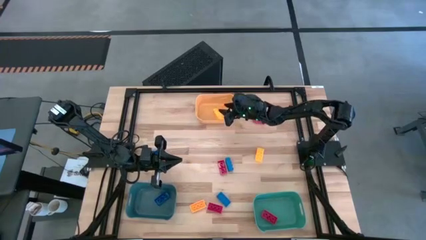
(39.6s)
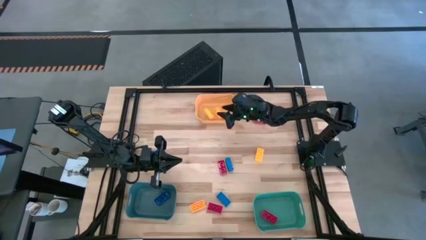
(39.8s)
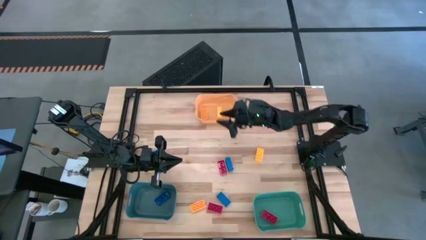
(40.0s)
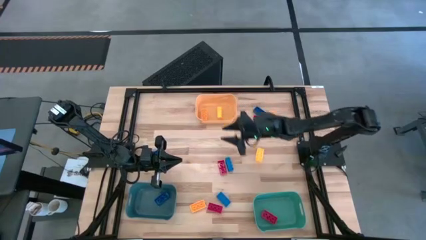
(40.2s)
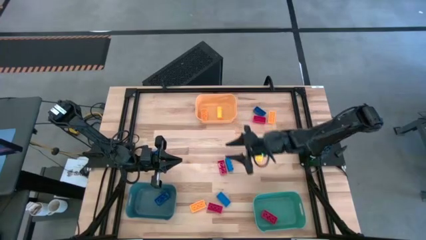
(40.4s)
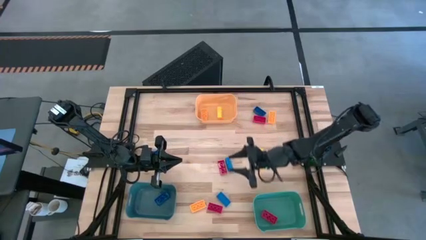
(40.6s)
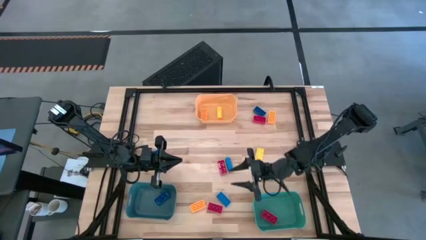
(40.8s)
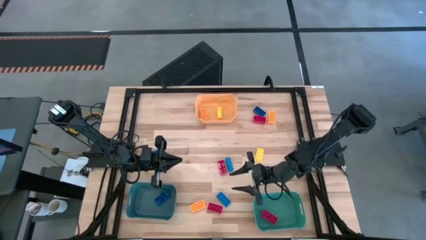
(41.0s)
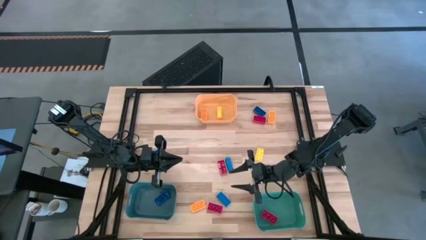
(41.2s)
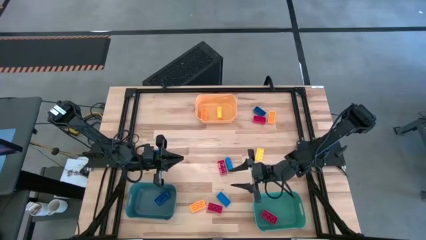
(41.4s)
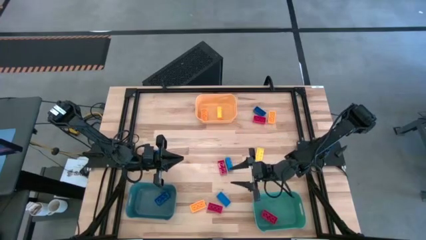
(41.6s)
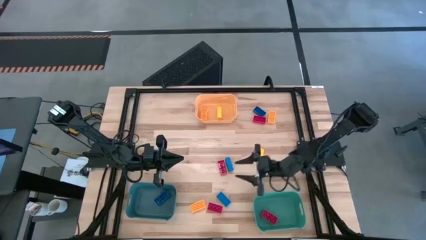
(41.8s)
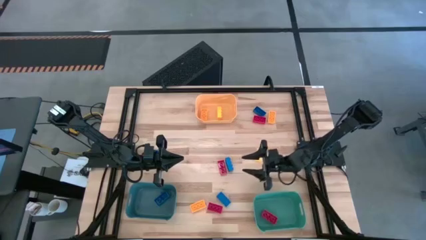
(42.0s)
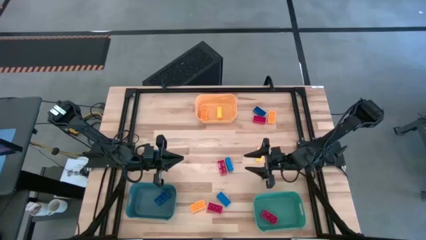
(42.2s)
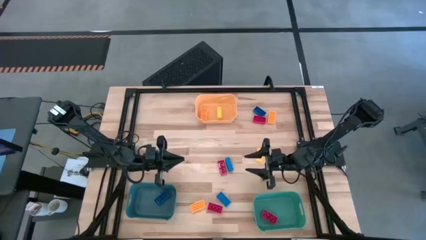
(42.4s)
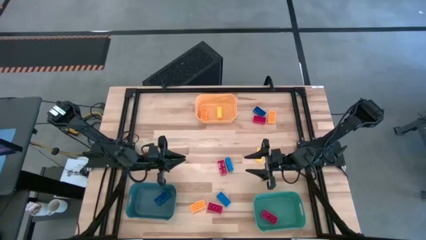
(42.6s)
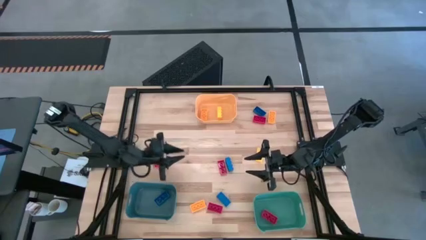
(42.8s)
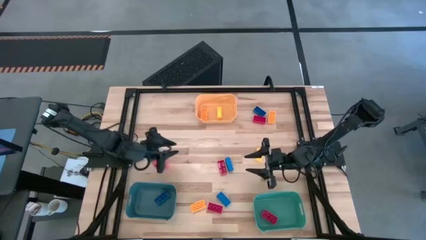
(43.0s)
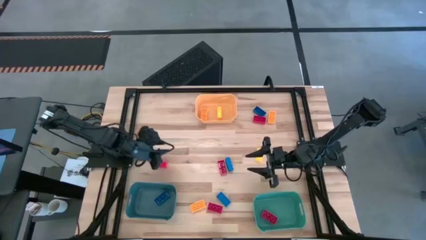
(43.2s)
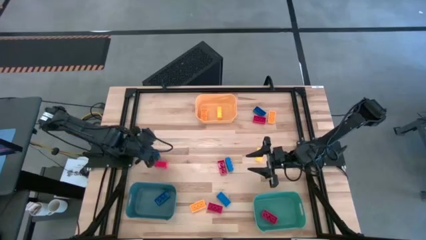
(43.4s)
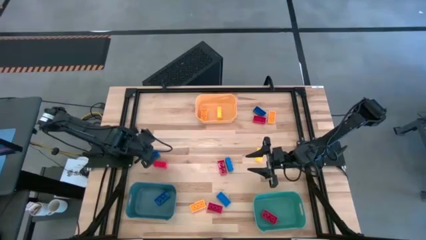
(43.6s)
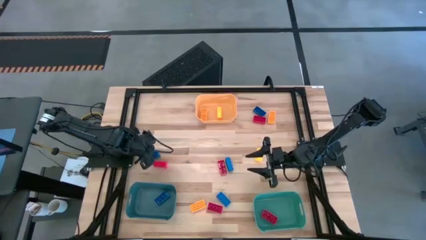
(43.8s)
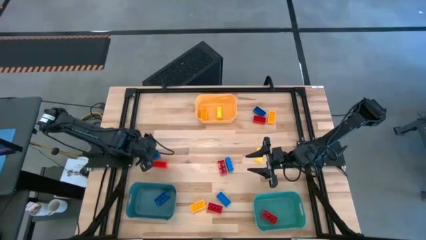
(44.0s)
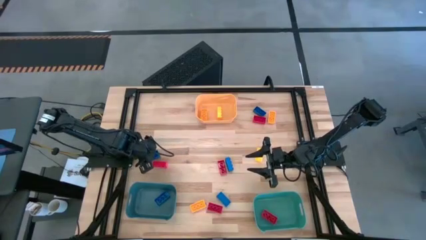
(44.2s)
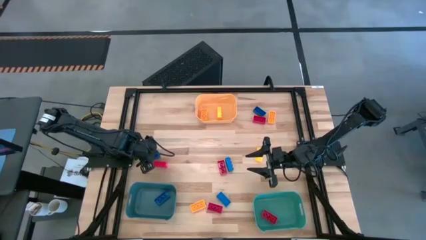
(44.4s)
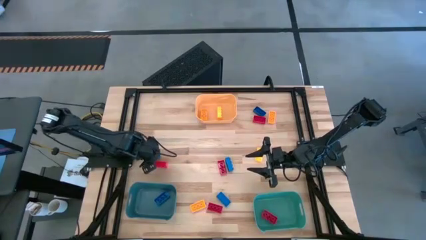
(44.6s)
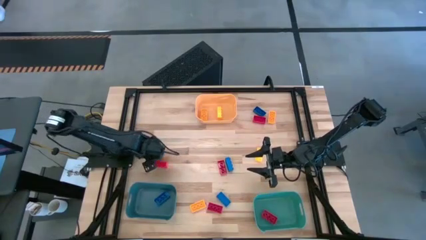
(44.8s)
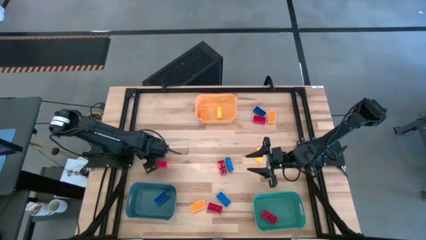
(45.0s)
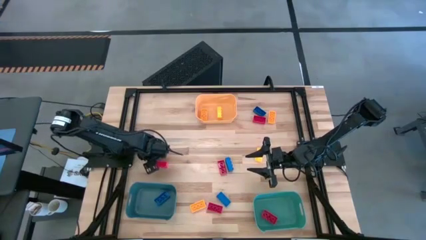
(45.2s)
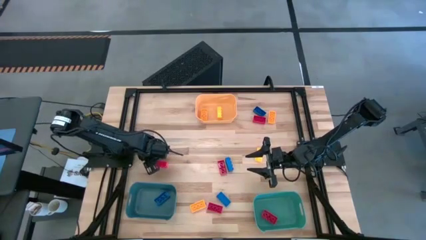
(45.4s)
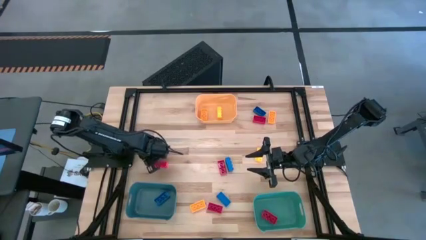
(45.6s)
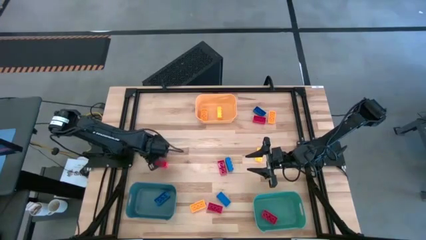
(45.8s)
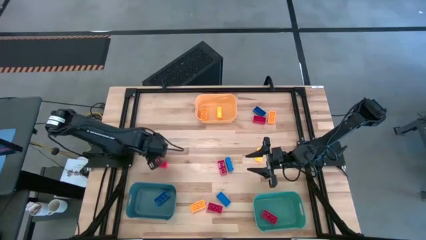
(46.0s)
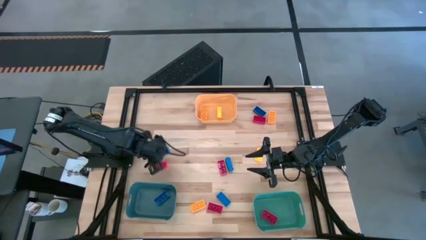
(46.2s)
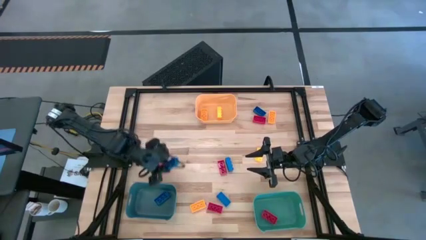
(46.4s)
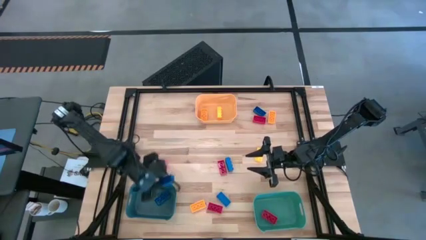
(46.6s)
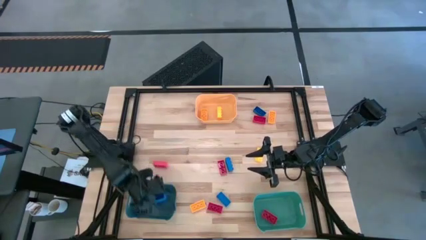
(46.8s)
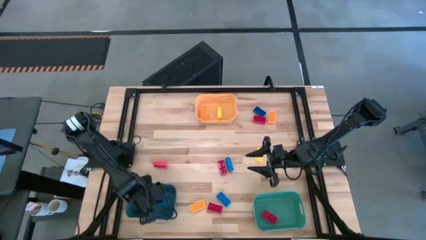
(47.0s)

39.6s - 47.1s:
Task: Sort & place blocks by color
Put the blue game piece into the blue bin

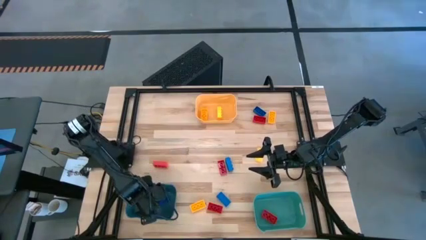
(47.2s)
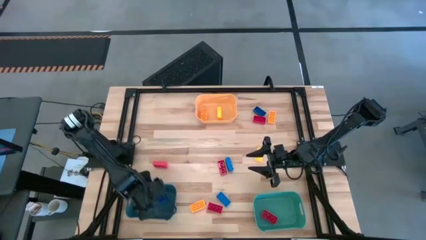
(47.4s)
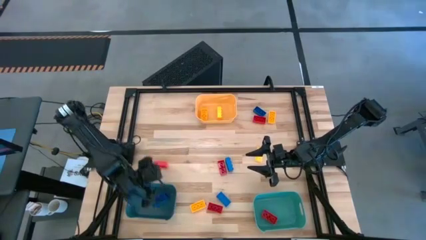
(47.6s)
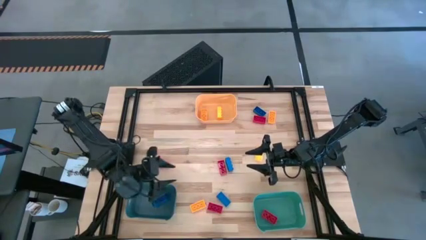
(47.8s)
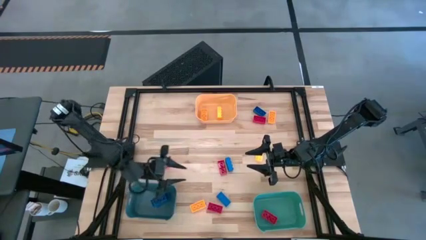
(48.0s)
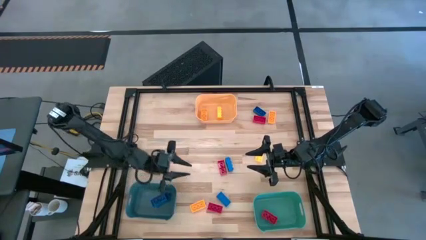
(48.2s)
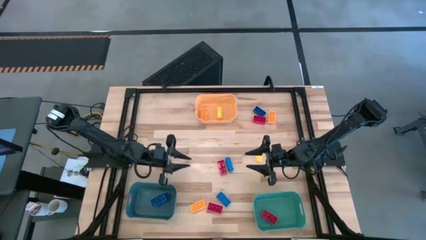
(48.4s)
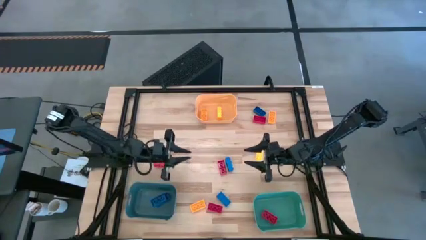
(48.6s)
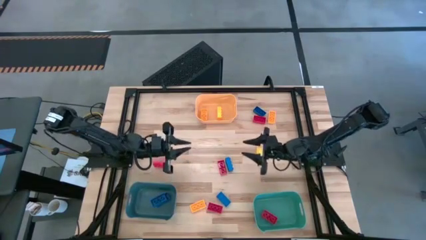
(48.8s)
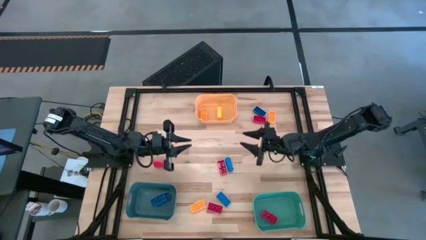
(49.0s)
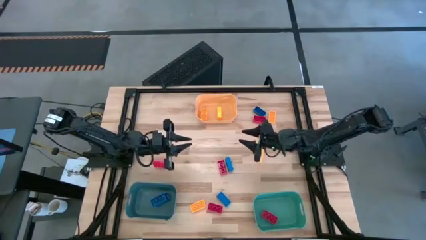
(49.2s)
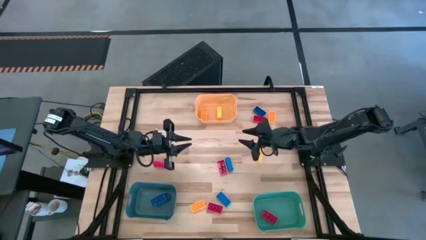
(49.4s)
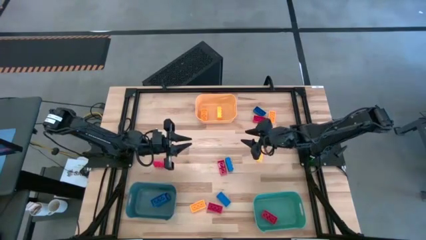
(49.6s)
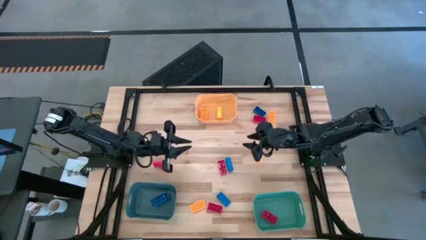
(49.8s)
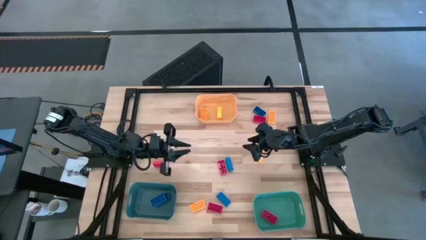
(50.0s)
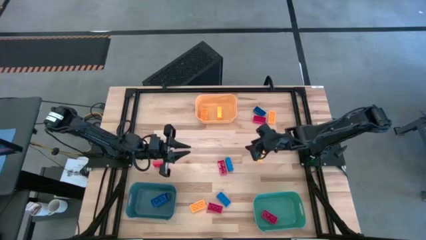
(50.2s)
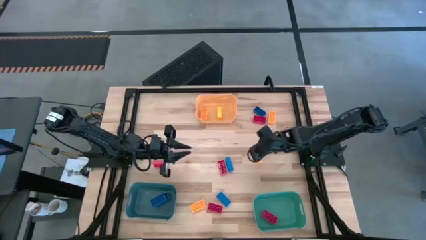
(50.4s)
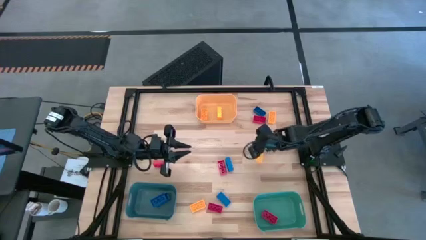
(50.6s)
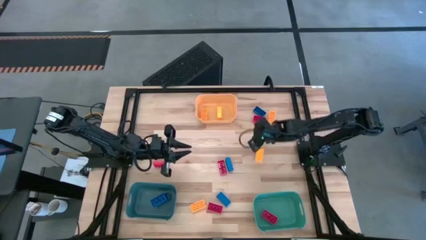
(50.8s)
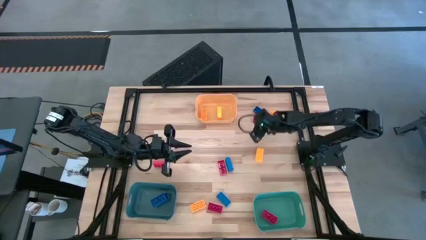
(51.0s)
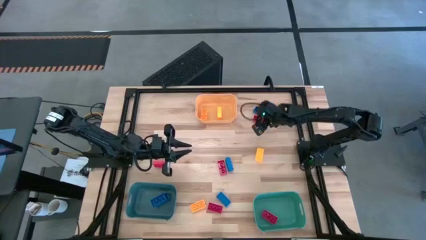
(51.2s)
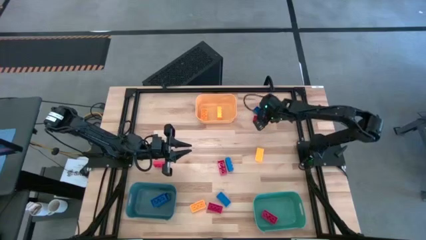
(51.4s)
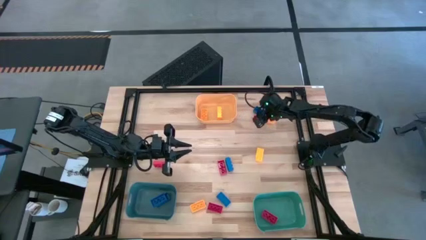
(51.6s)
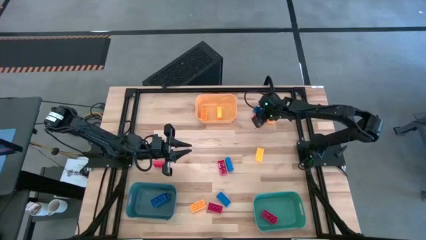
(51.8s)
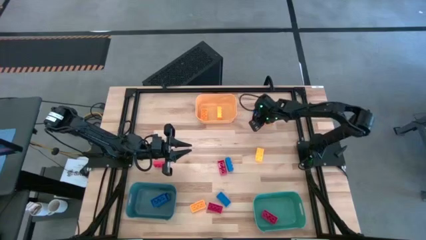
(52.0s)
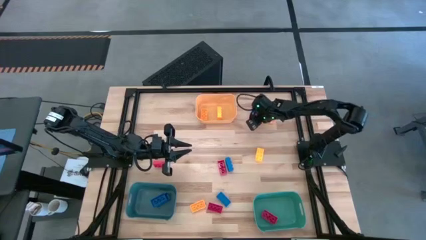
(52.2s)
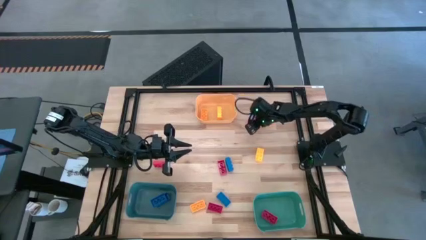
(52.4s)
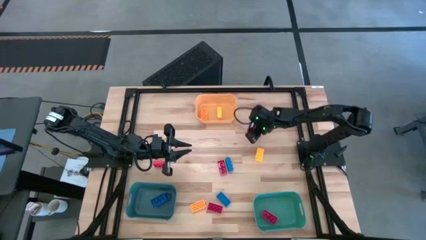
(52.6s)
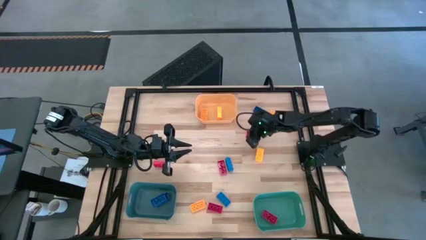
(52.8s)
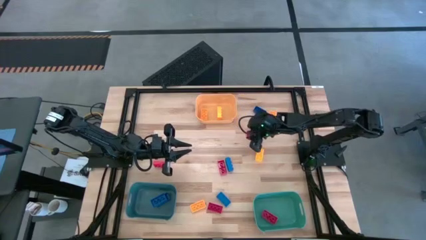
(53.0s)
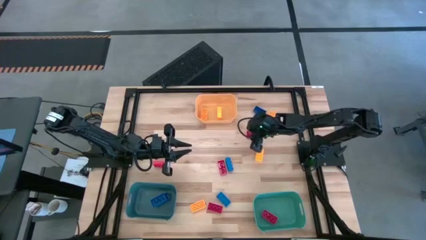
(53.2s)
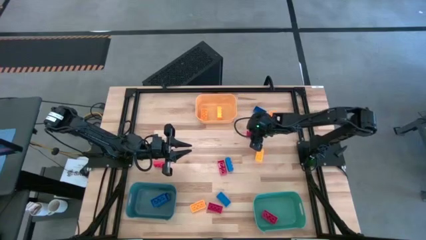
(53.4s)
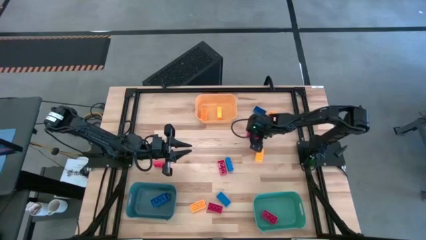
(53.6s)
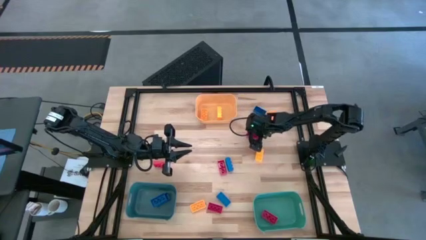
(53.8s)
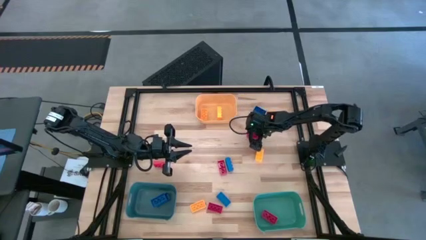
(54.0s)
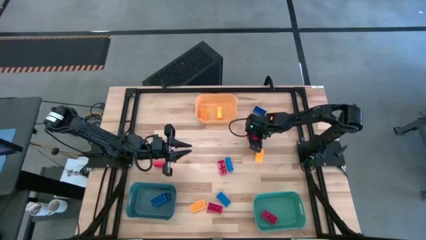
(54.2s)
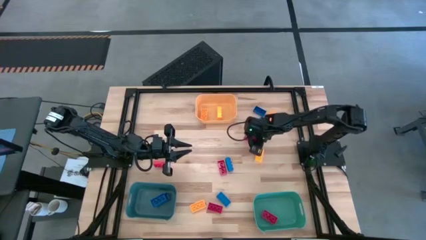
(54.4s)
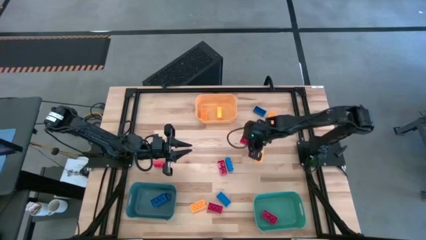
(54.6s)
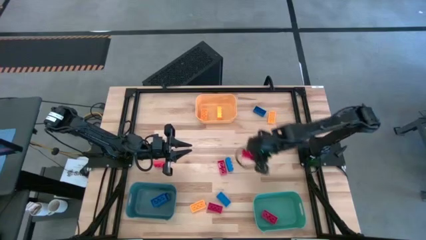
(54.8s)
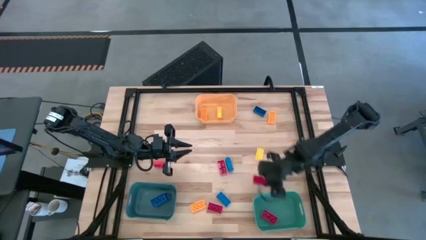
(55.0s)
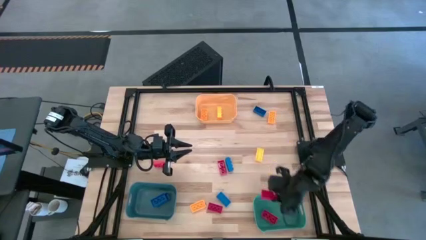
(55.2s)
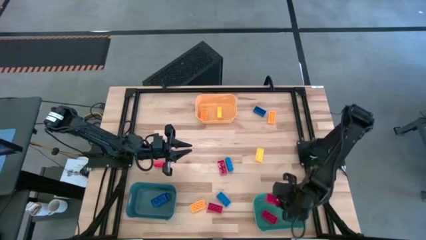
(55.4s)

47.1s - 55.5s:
Put the red game piece into the green bin
